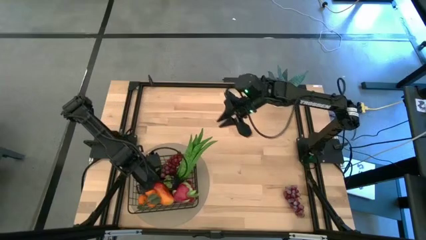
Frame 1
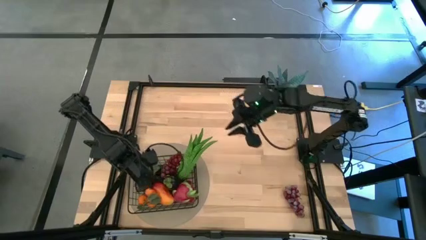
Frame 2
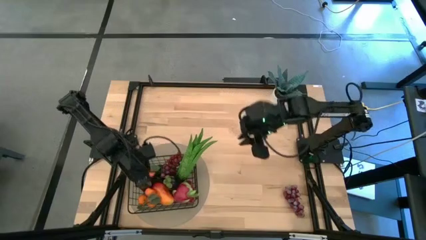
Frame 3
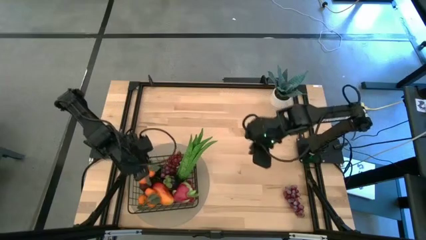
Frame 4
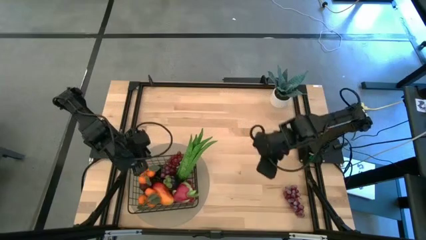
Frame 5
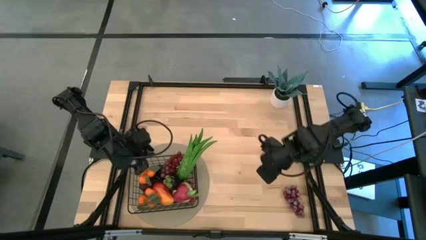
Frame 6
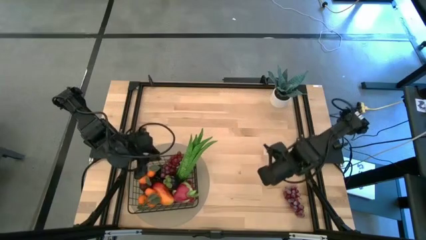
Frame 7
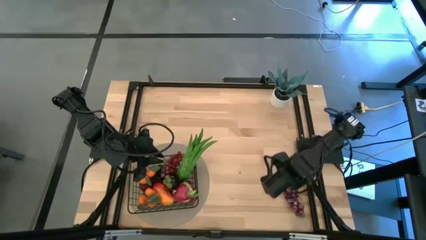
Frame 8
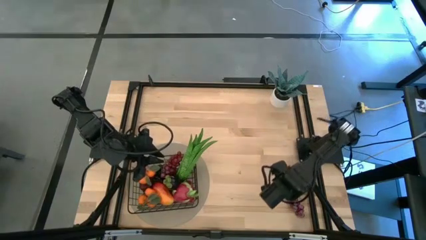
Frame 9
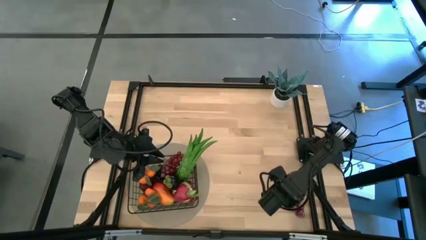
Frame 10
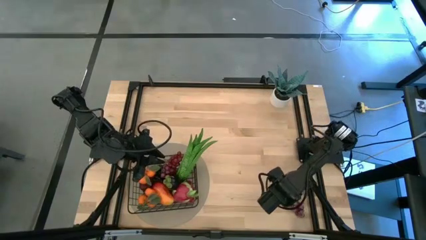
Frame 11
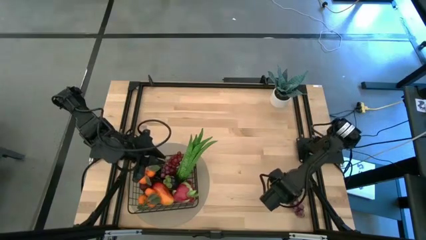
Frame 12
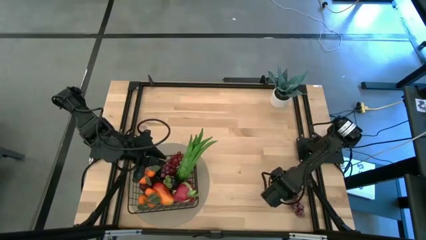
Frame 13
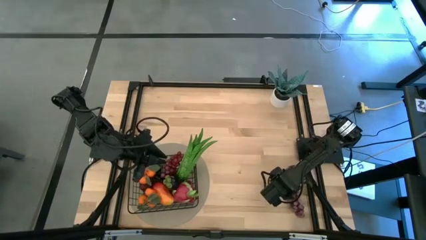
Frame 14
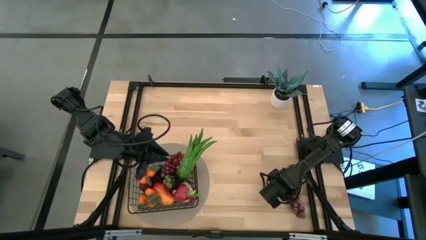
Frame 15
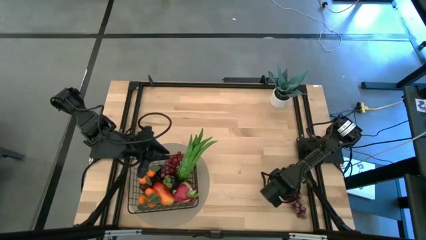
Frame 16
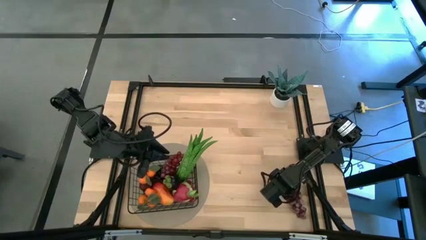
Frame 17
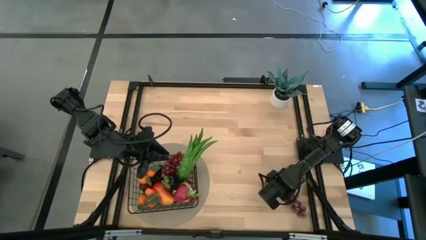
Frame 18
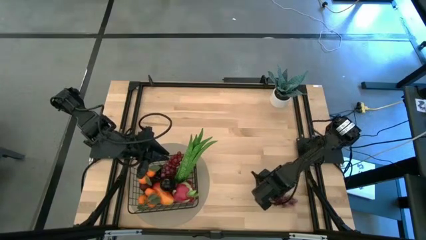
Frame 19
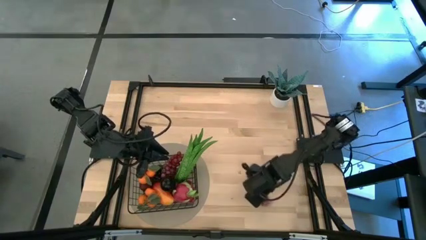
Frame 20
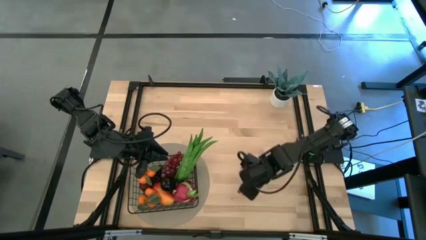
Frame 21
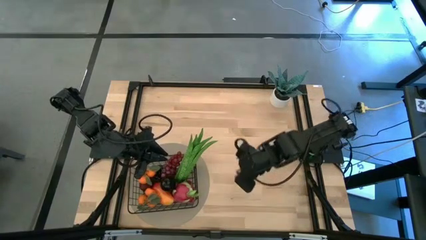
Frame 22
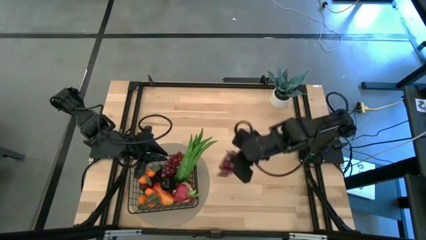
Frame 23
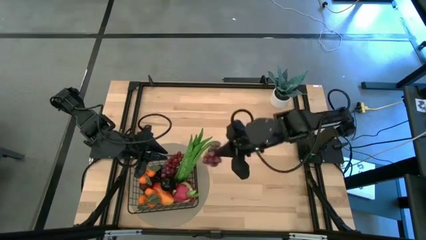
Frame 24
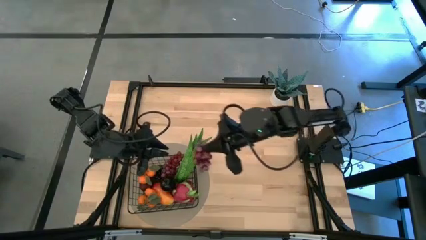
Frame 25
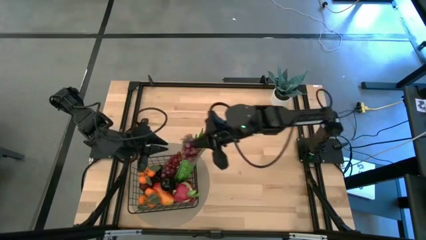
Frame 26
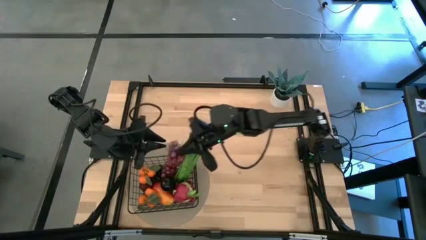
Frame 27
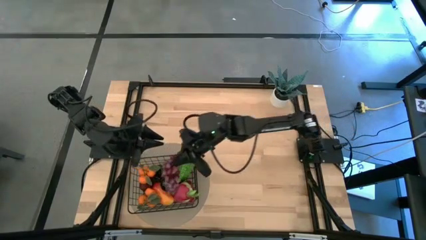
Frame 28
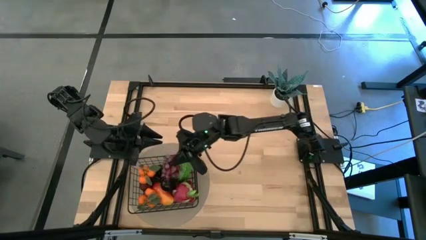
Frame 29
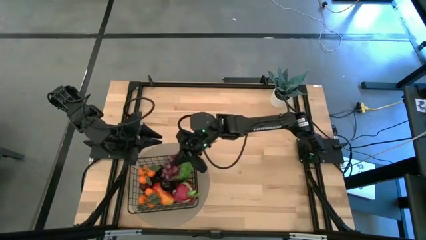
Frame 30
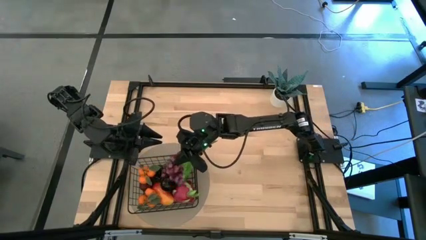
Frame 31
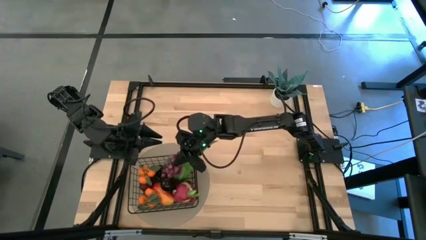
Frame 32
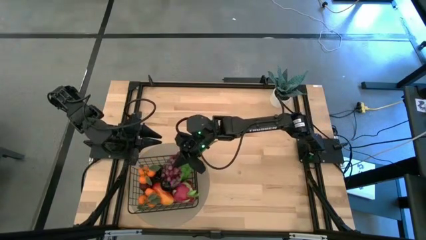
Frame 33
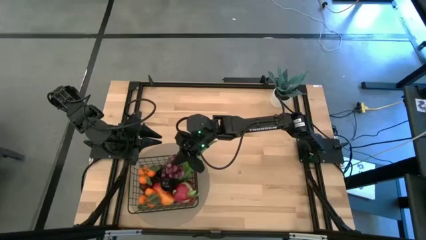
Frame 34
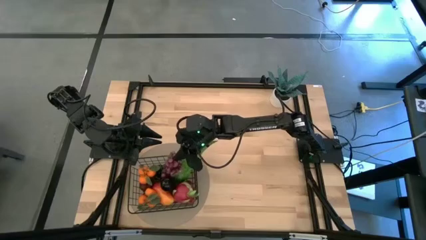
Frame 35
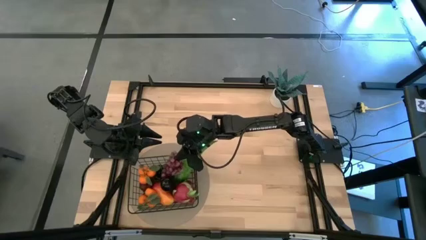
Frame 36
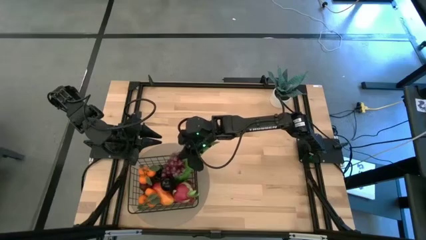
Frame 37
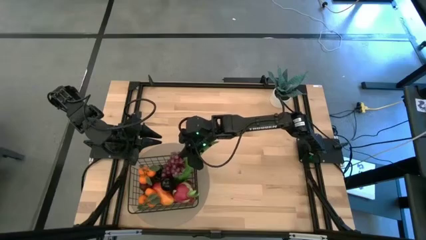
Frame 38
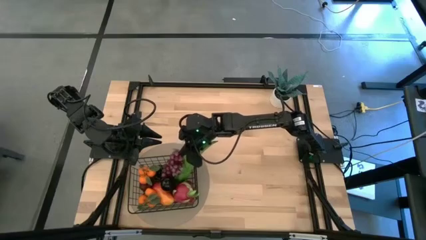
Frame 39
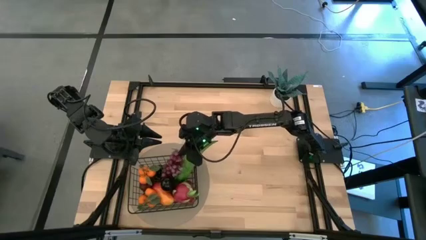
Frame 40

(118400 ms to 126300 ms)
Task: Build produce basket
Put the purple grapes into the black wire basket

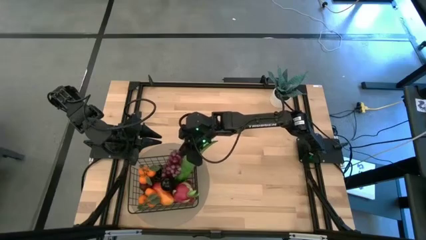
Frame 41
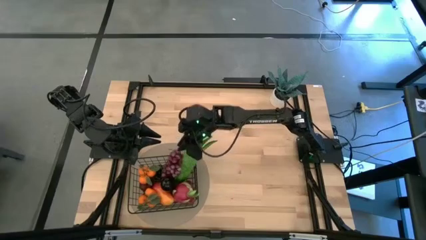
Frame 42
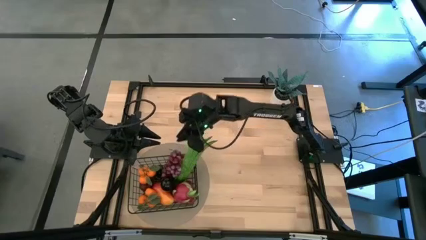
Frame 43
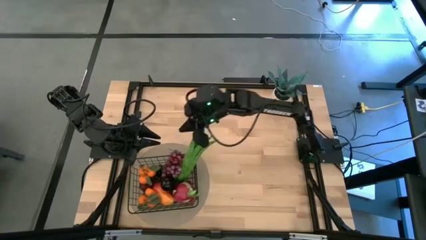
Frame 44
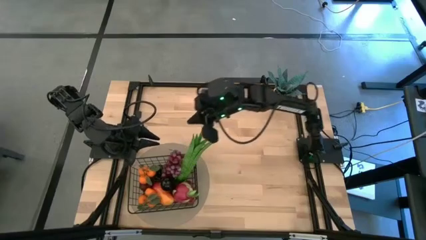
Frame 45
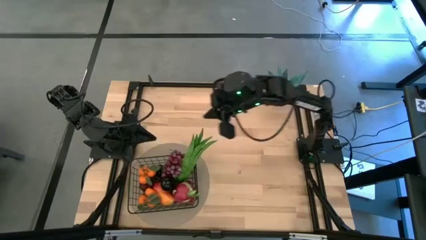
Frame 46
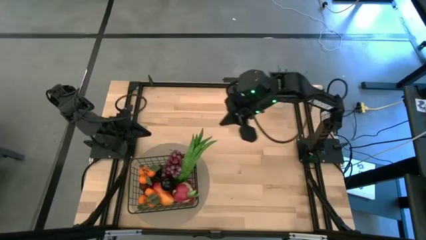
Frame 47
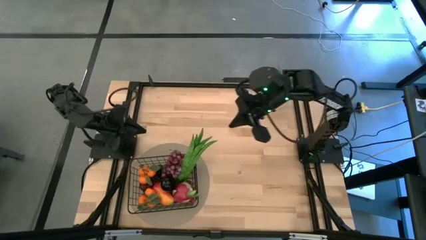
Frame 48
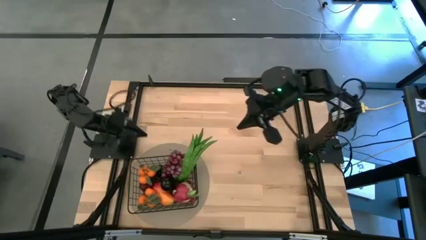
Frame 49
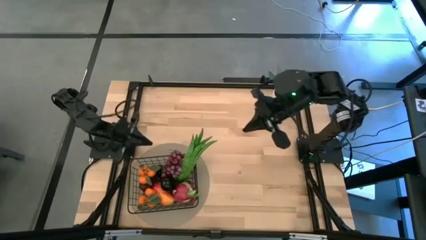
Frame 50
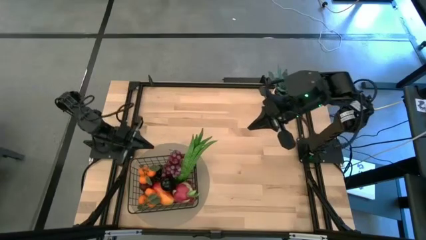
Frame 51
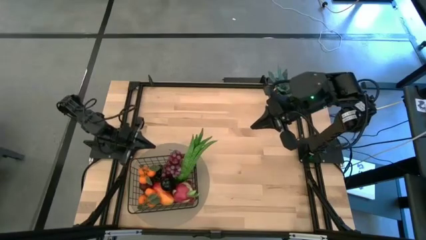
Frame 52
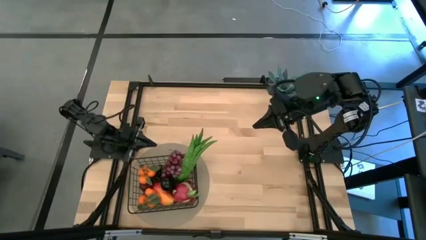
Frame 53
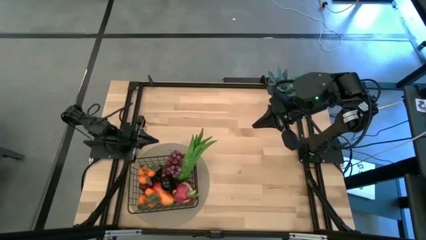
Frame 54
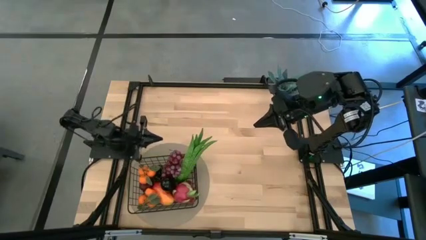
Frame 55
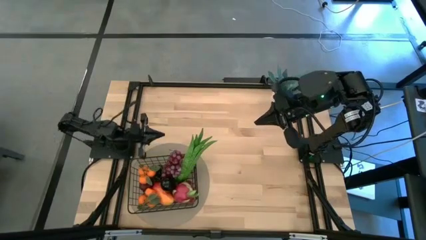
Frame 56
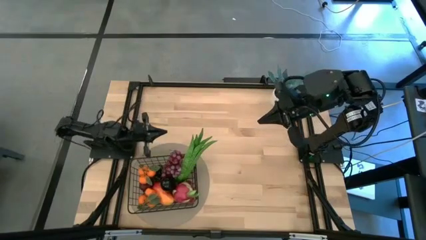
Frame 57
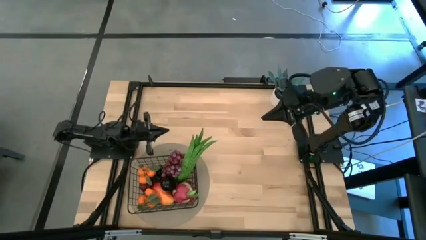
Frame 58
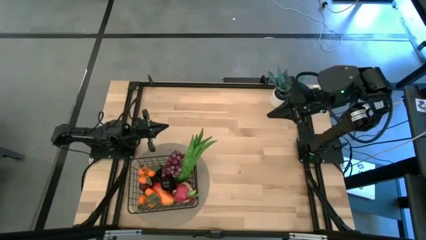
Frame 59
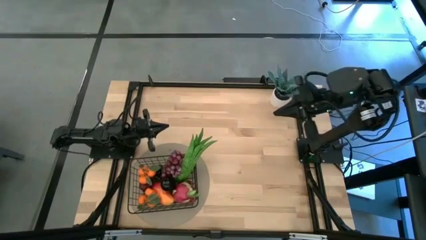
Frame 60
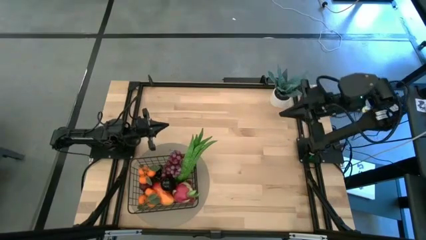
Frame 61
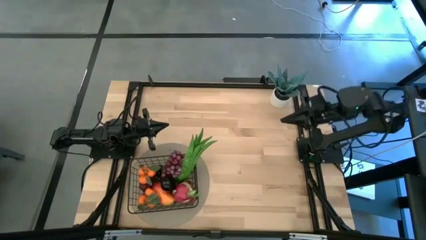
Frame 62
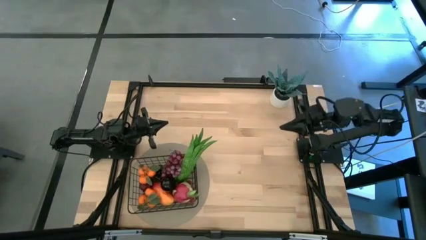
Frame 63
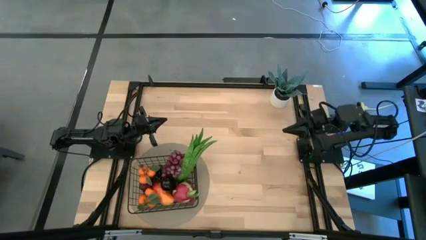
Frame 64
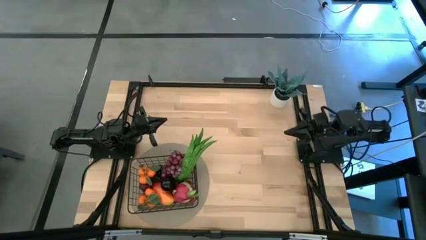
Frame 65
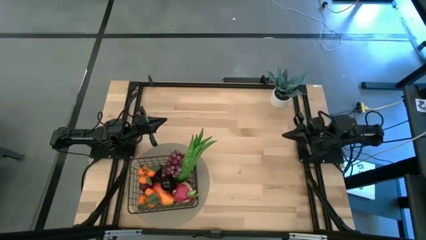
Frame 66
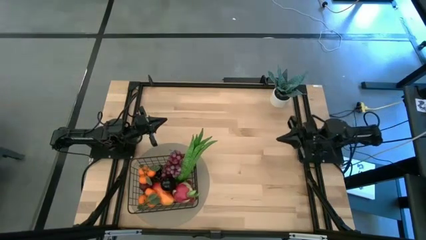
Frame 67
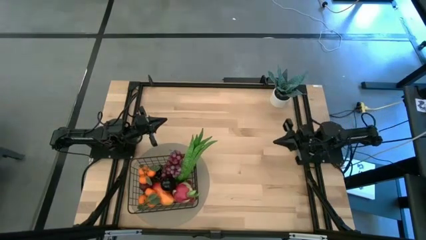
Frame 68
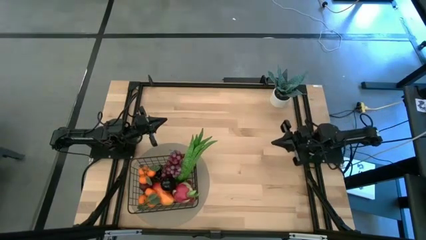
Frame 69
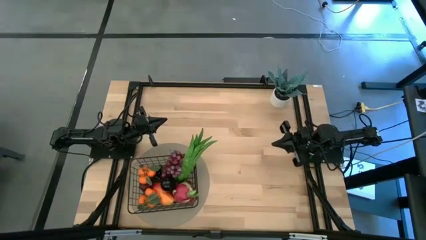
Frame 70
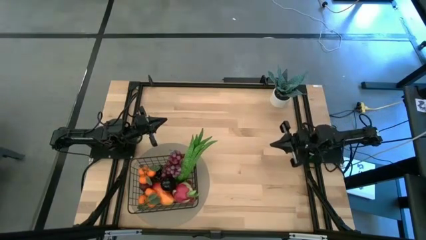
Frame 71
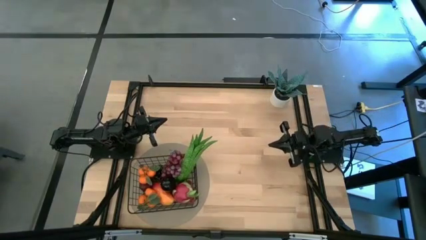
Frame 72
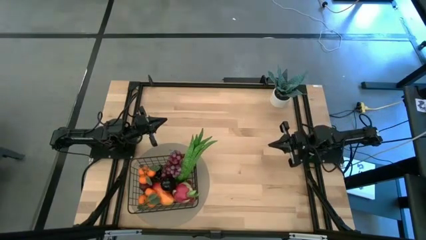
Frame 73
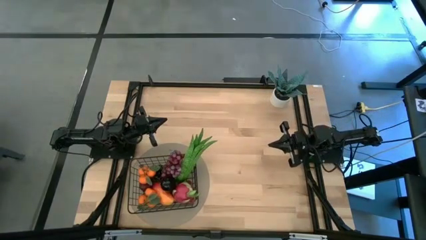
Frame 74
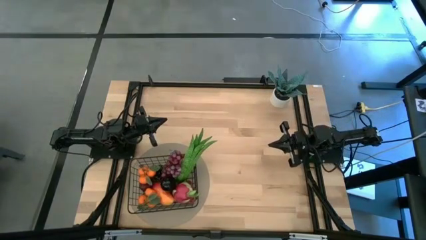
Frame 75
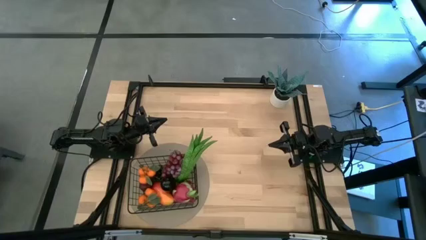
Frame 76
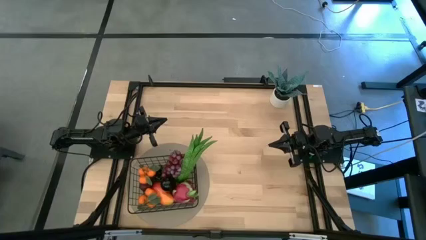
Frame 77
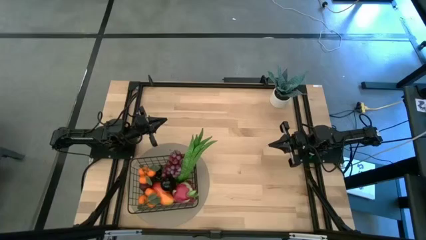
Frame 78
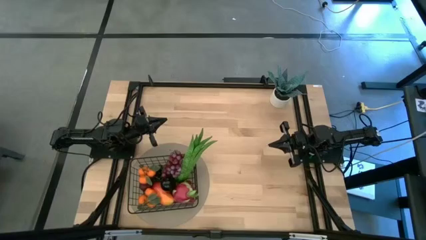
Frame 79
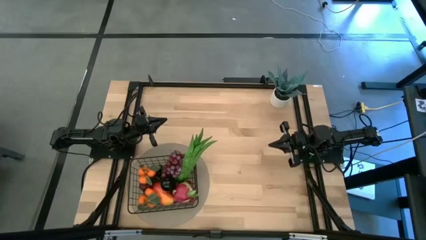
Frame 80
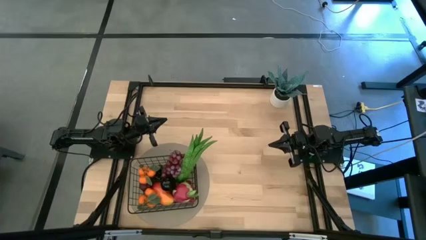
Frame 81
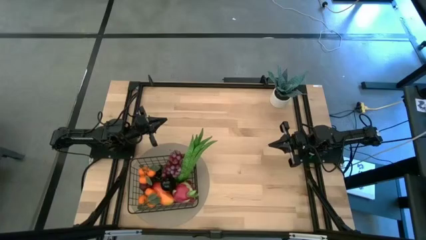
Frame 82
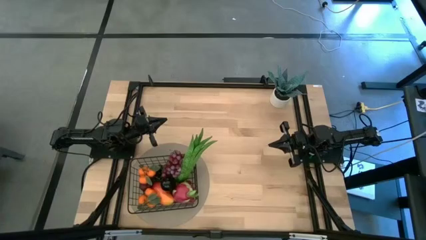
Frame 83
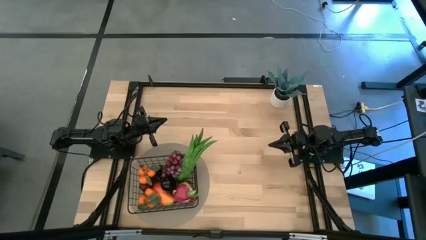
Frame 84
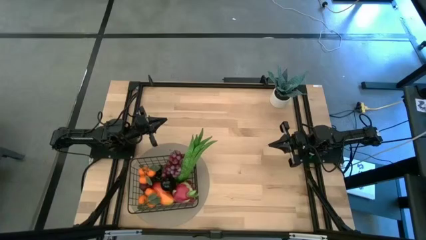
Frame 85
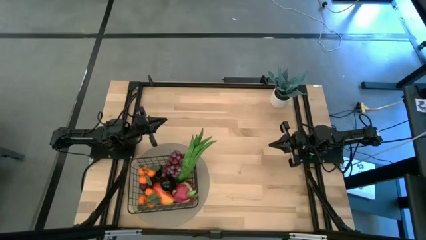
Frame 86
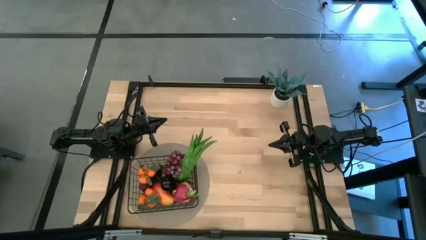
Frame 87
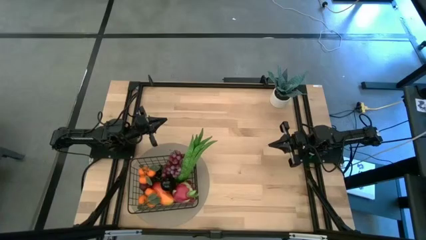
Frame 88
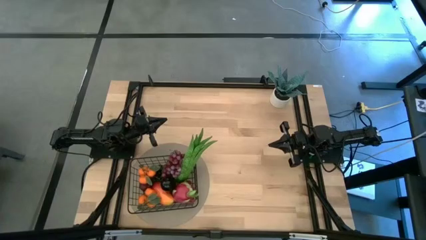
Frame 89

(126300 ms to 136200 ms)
Return to Home Position
